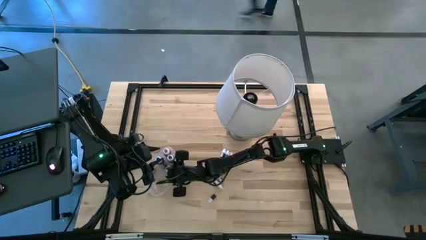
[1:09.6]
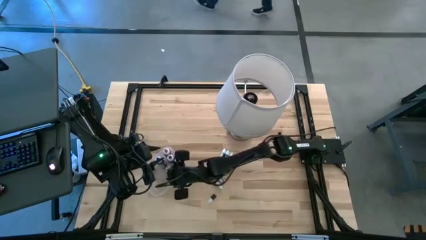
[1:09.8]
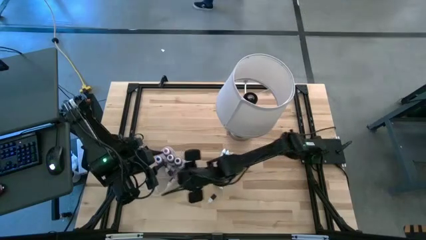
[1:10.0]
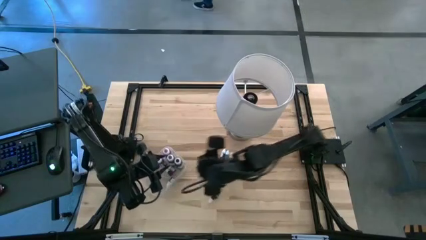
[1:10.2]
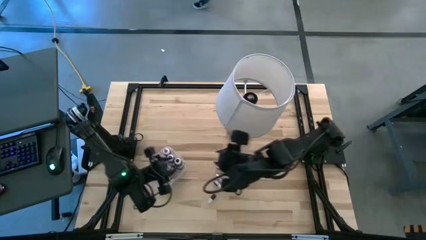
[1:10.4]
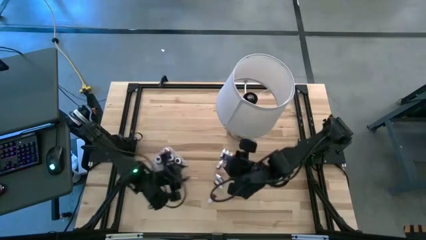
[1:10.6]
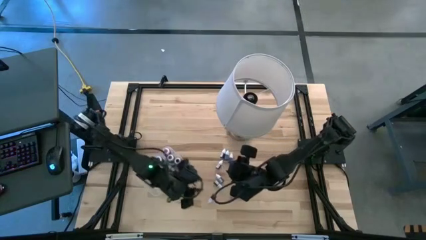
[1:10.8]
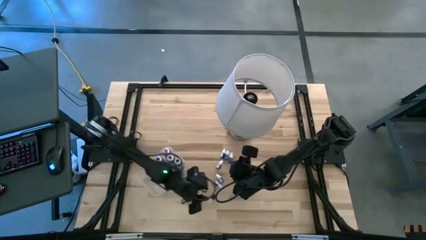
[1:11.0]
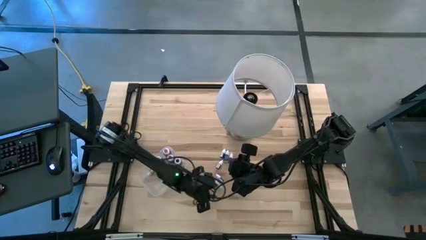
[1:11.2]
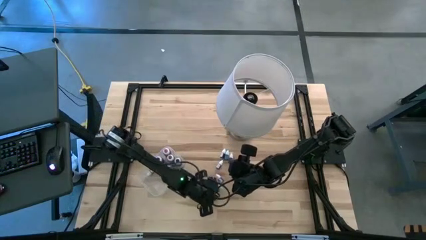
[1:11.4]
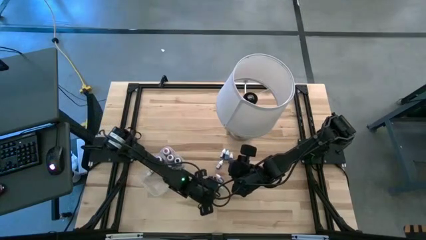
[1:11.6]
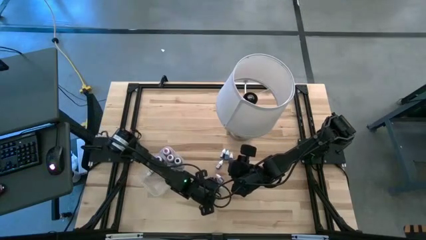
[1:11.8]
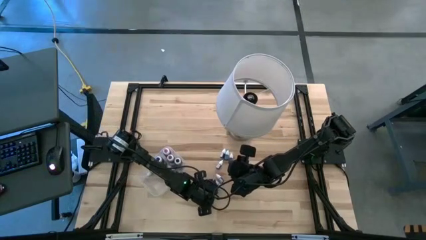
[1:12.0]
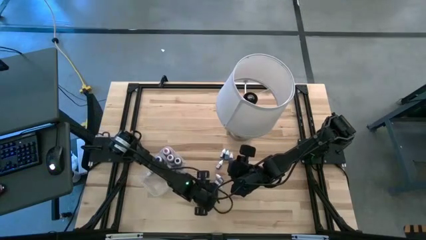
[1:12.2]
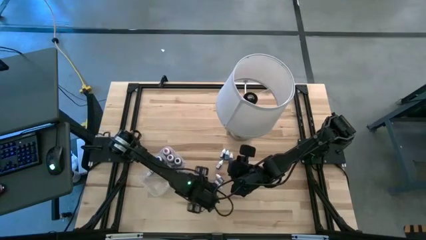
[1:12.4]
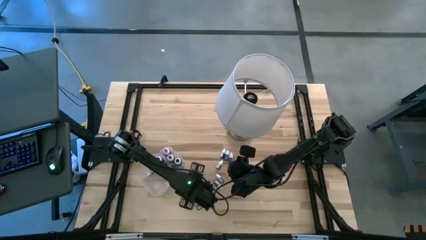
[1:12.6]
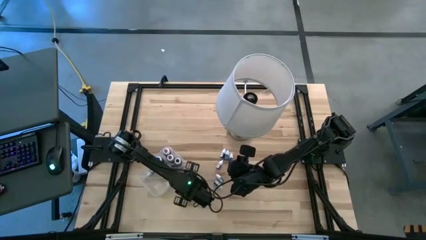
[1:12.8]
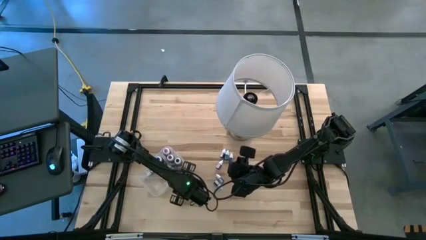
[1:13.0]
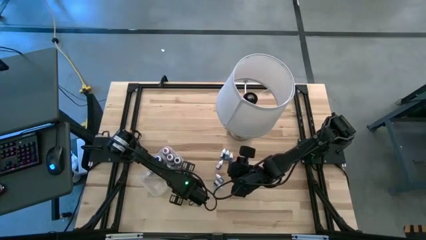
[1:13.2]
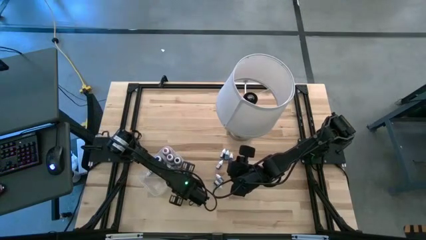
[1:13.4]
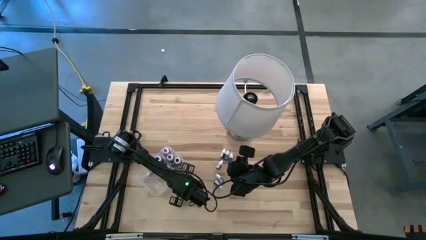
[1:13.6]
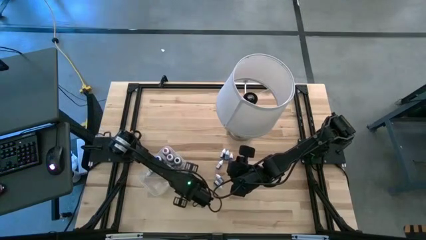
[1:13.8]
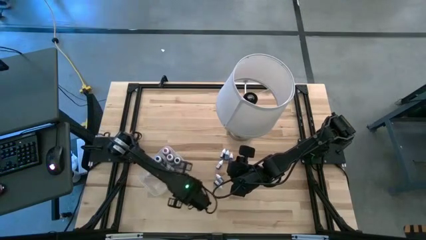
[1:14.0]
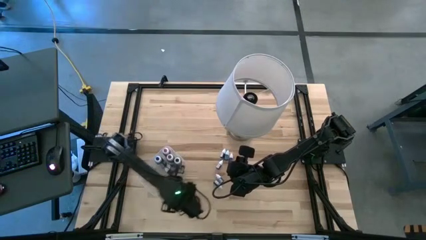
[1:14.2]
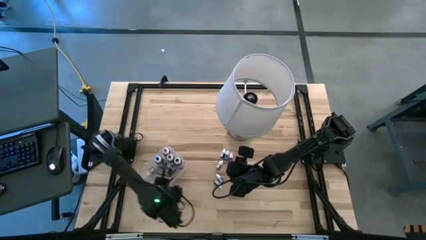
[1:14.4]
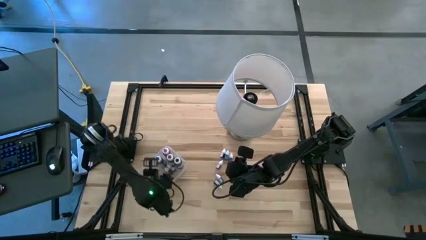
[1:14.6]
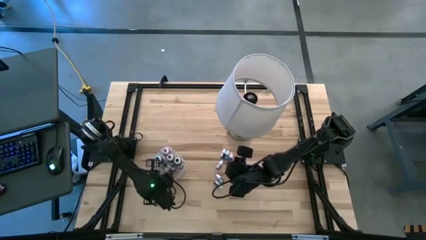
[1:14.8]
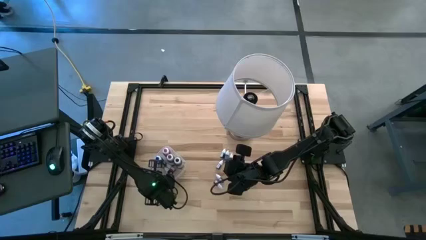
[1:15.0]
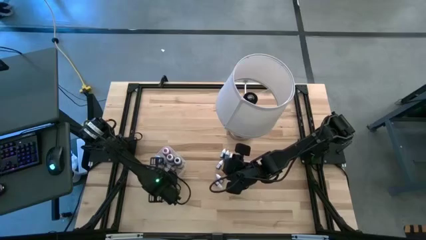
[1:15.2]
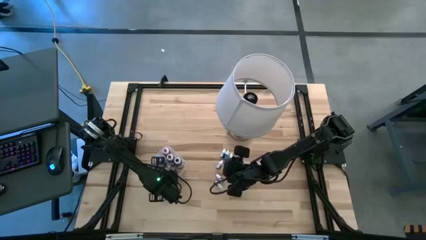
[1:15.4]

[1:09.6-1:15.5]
Task: Pick & Place food coloring
Put the red food coloring bottle into the transparent bin

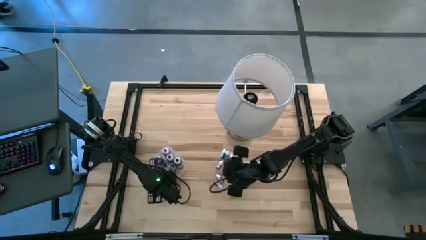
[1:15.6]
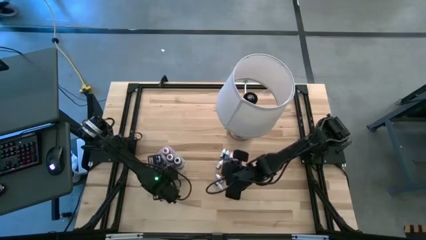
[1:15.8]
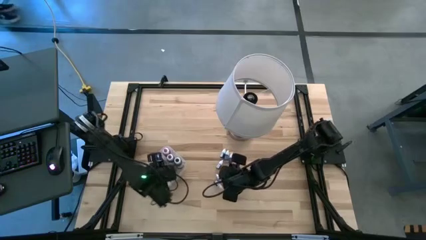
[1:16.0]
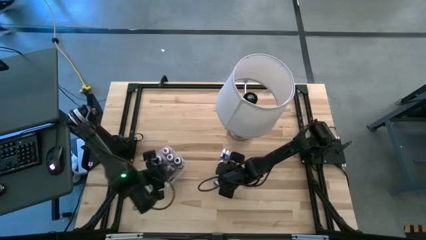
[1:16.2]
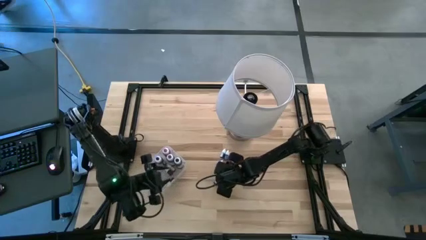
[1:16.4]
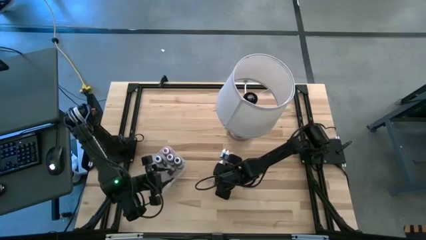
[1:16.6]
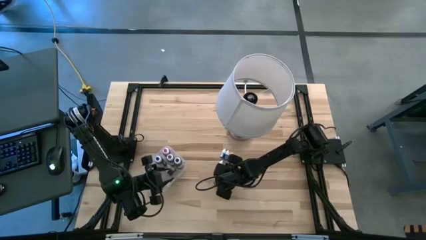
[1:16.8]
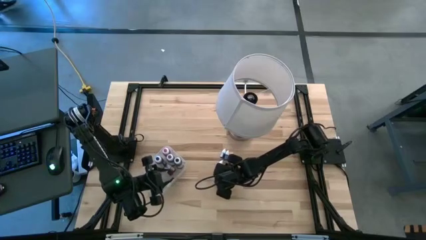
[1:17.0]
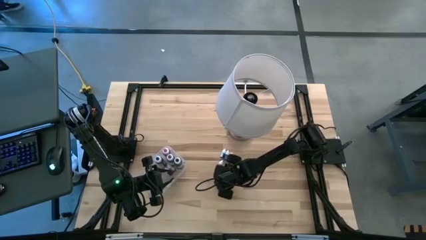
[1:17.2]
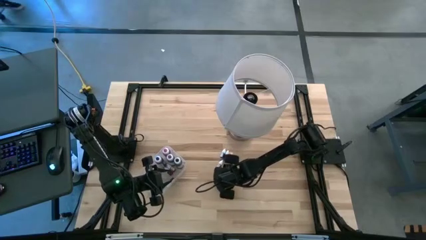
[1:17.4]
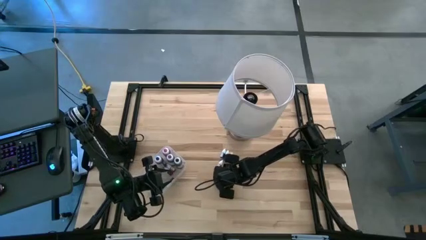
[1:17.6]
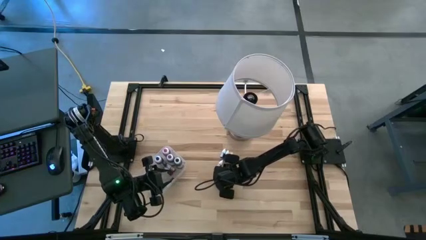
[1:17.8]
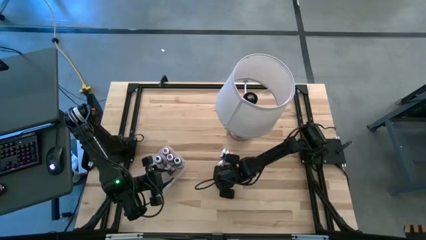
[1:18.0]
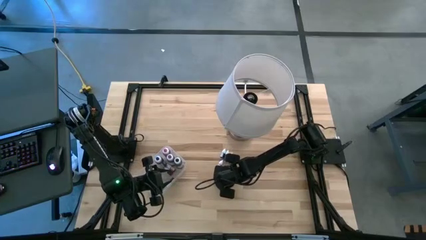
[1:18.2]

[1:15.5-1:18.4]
Put the black food coloring bottle into the transparent bin

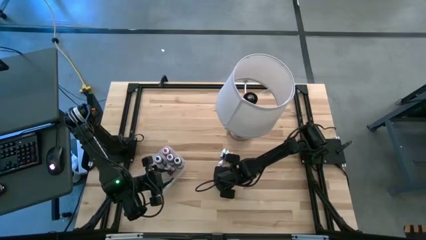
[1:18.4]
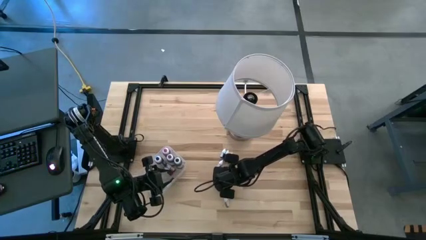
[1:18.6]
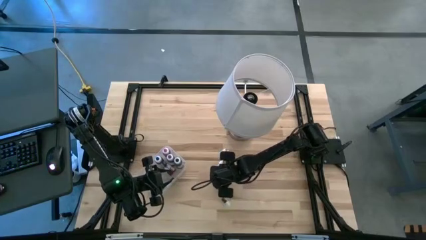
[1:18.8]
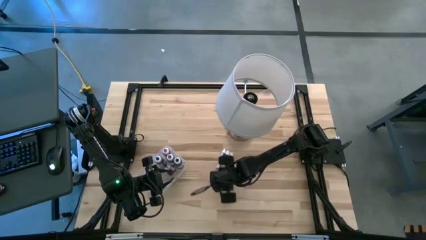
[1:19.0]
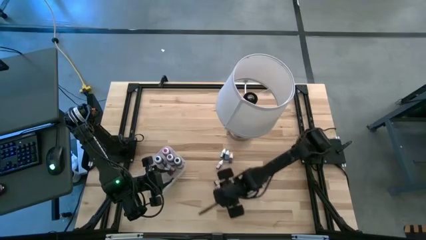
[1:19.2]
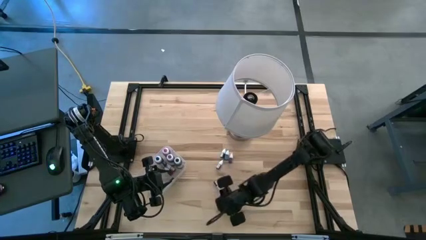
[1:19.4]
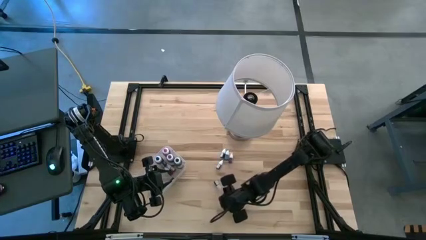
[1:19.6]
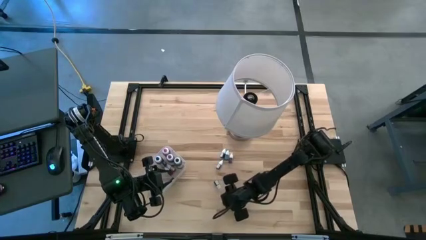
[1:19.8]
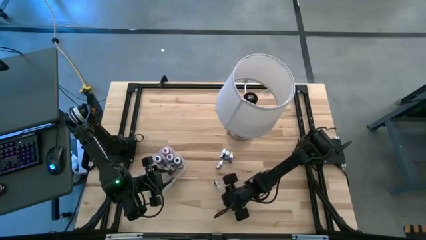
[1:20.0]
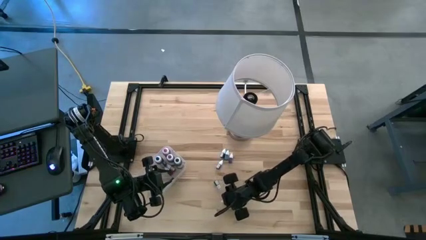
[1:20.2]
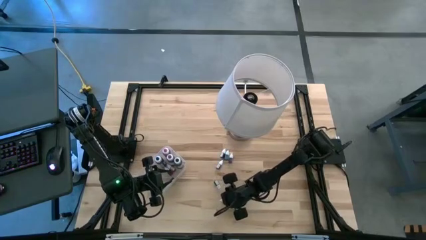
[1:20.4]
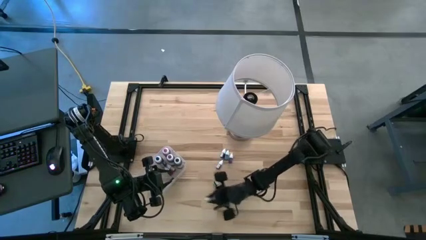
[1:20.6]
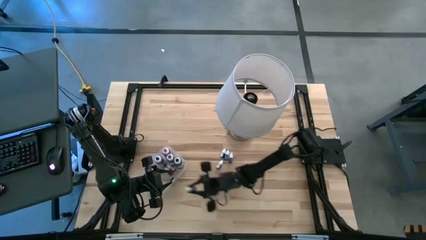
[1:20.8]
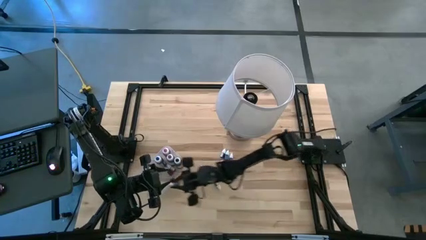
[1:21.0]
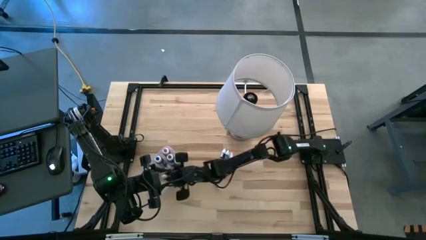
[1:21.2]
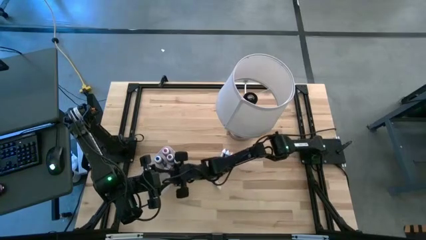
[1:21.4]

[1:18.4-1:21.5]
Put the black food coloring bottle into the transparent bin

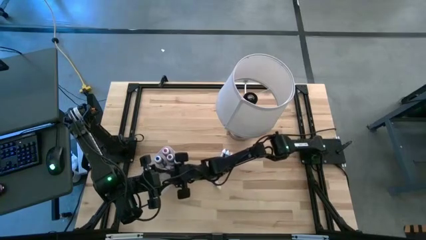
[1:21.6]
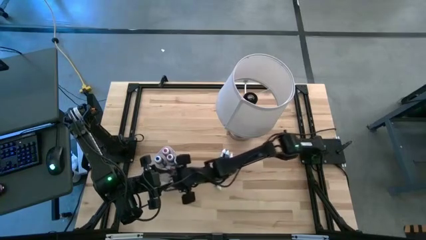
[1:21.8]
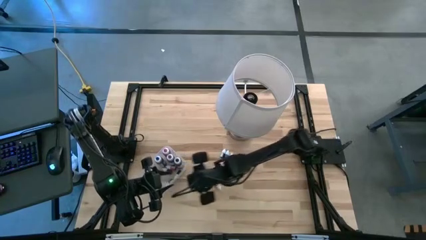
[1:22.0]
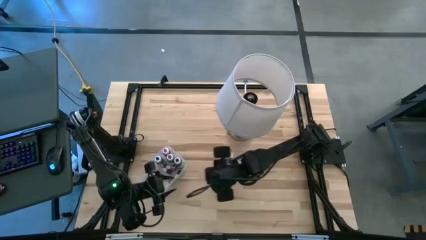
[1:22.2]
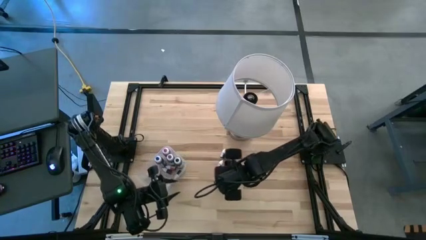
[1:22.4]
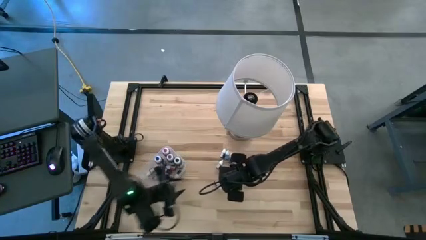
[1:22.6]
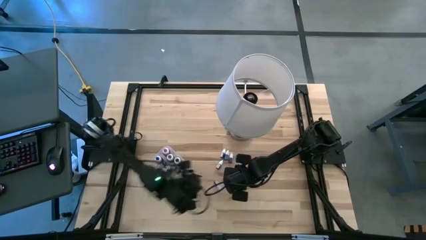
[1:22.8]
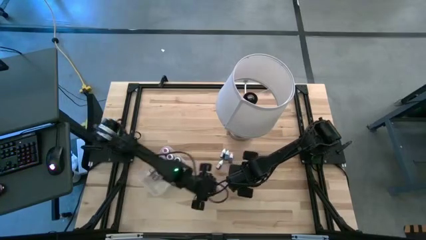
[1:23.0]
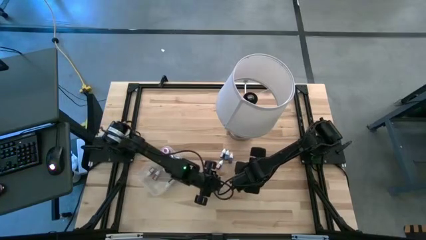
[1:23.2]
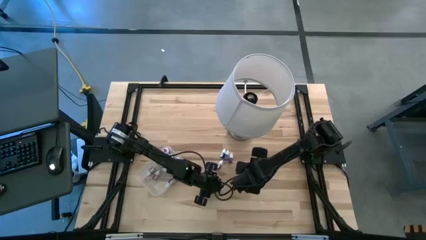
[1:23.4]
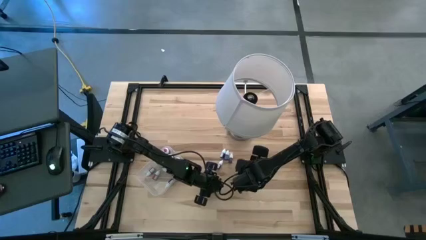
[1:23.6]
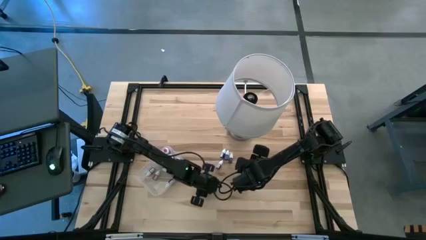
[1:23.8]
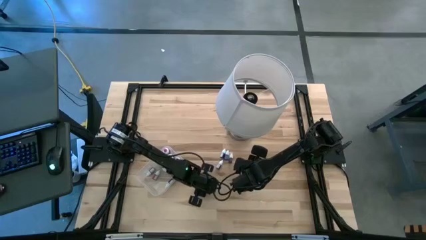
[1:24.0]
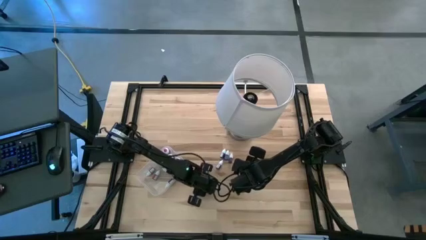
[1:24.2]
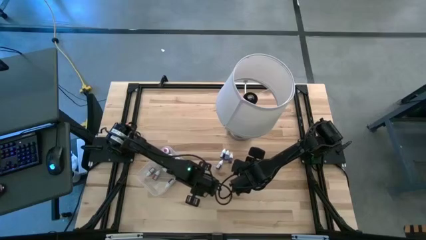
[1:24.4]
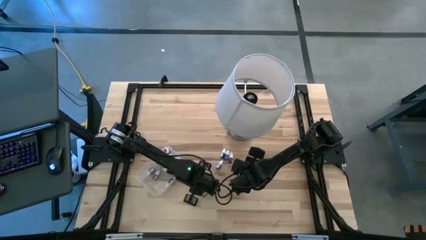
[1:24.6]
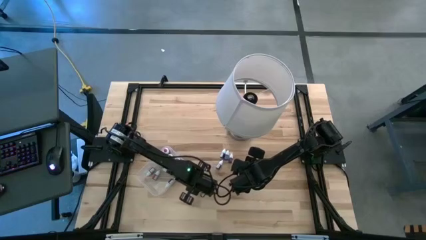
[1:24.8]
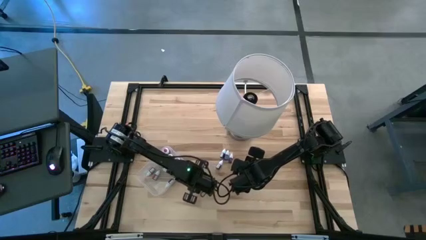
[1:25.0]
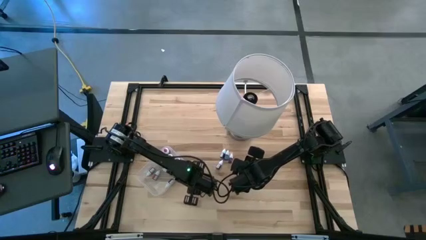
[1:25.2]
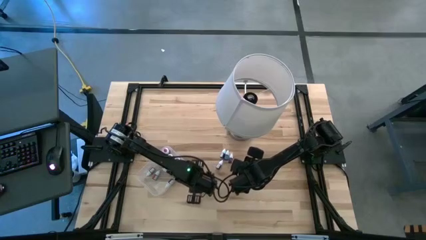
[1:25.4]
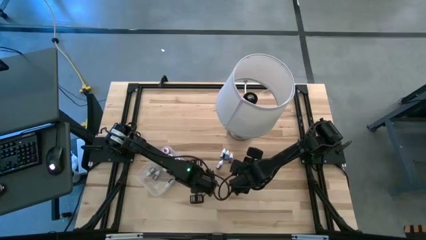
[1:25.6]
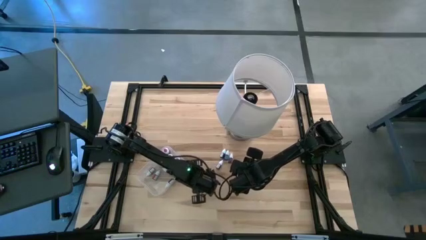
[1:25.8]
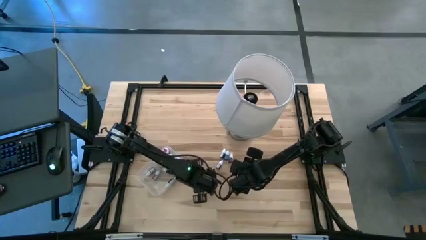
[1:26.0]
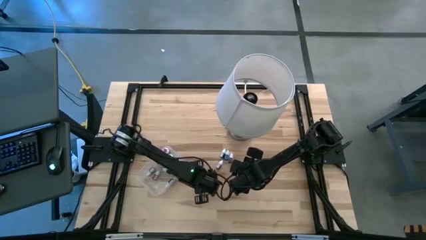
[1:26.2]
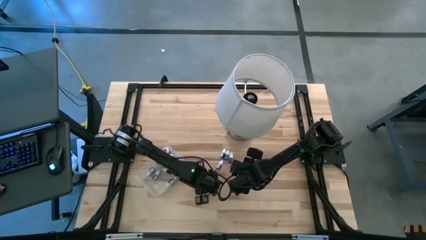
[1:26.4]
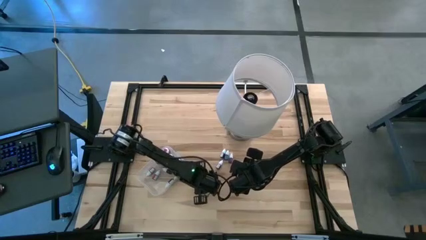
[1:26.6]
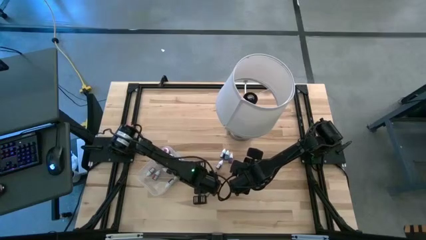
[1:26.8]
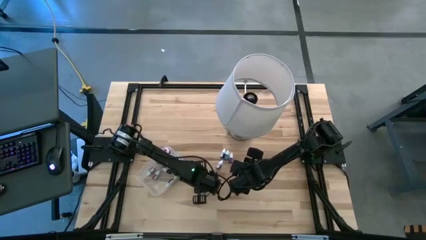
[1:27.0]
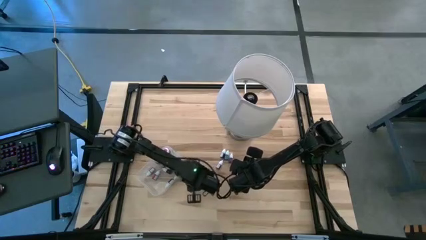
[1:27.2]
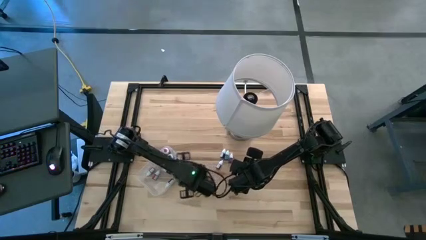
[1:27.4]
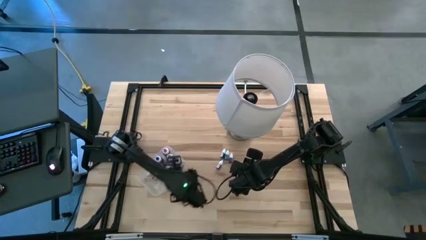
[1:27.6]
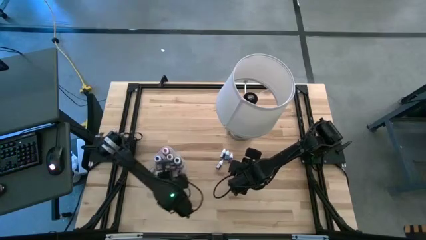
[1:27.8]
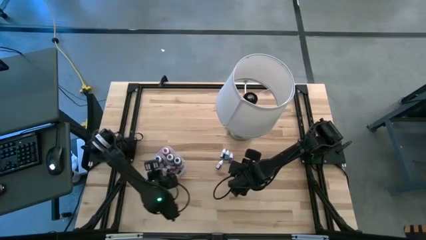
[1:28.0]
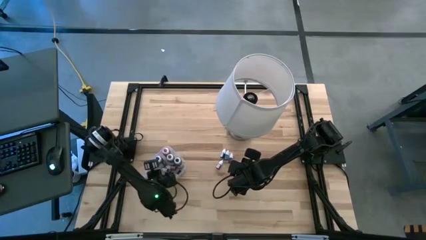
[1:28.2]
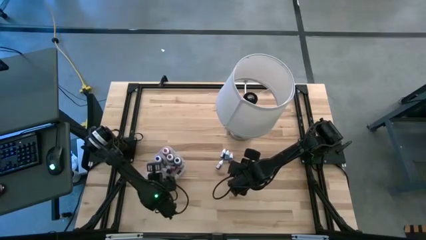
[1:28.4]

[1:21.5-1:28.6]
Put the brown food coloring bottle into the transparent bin
